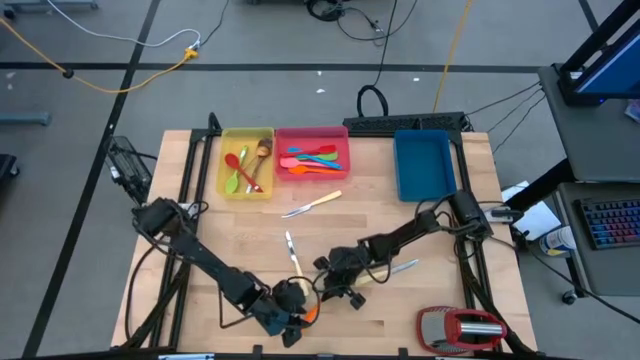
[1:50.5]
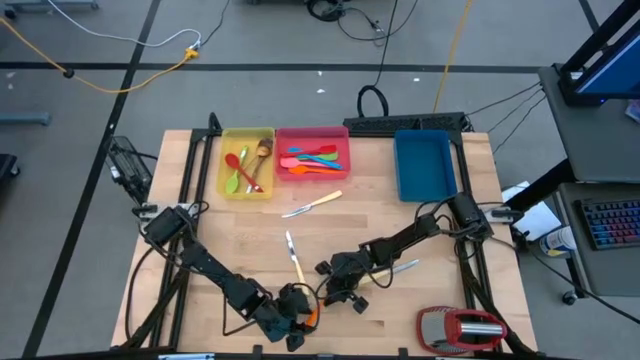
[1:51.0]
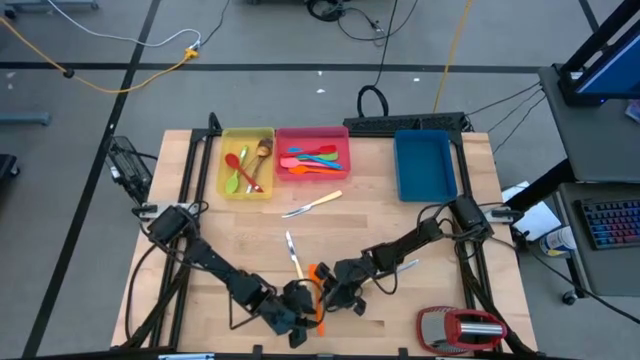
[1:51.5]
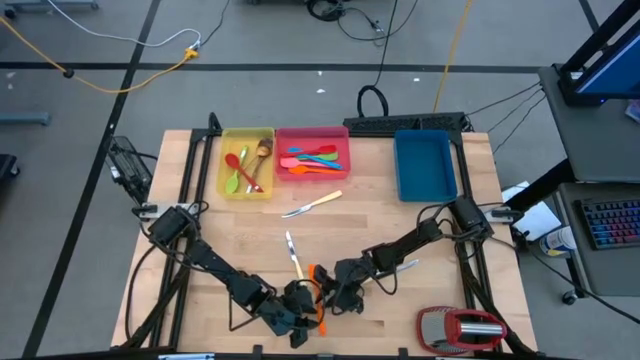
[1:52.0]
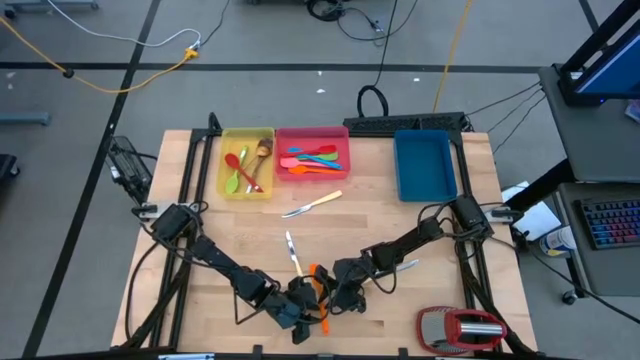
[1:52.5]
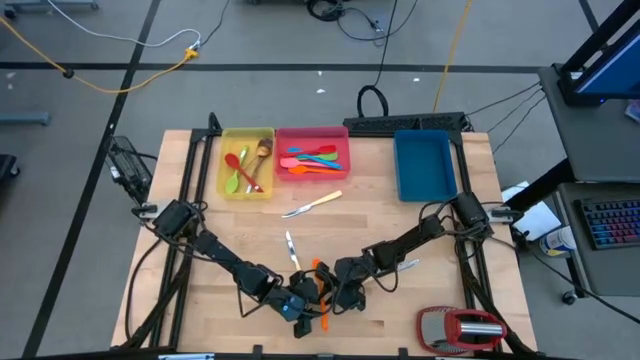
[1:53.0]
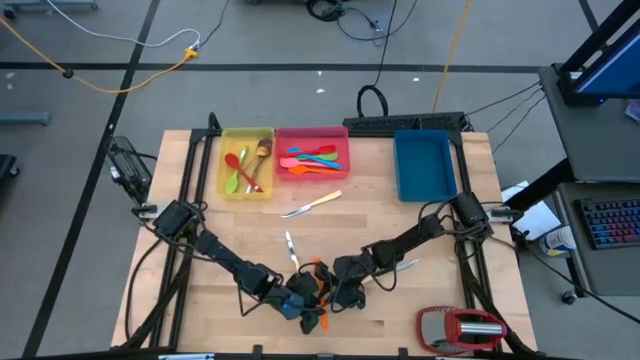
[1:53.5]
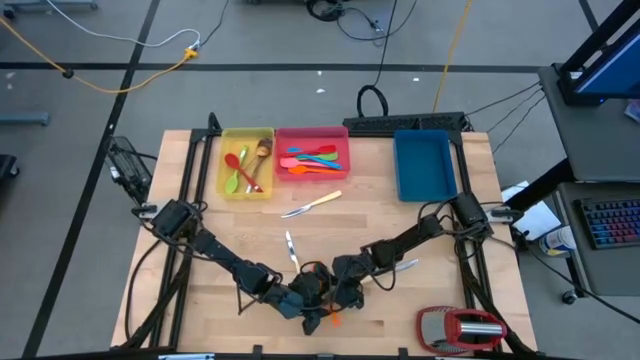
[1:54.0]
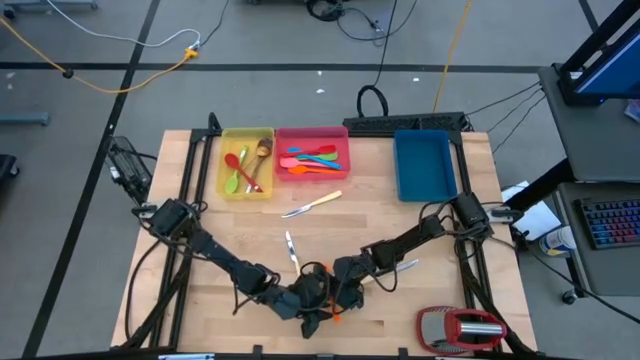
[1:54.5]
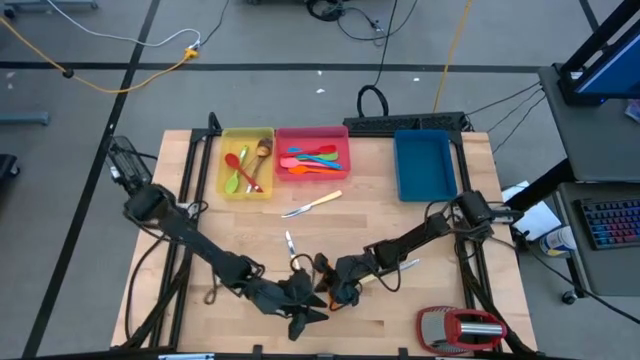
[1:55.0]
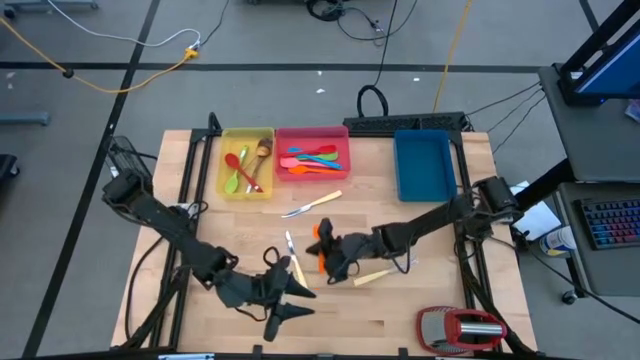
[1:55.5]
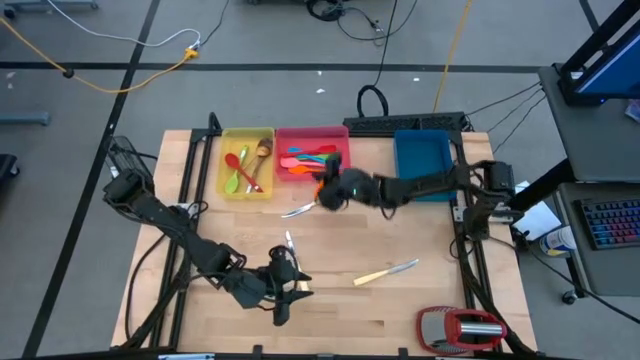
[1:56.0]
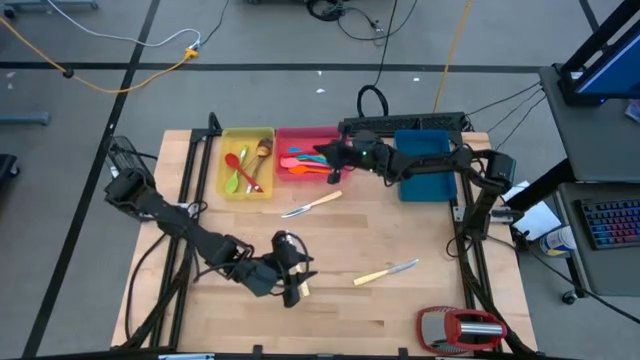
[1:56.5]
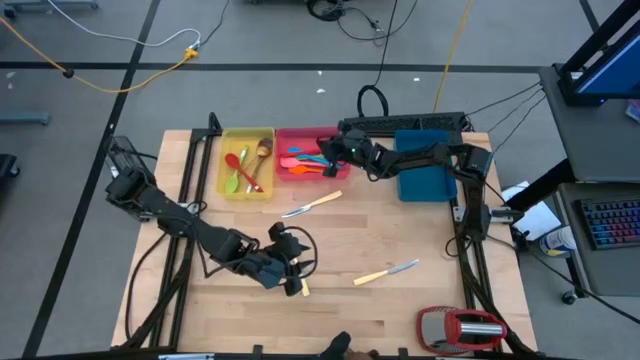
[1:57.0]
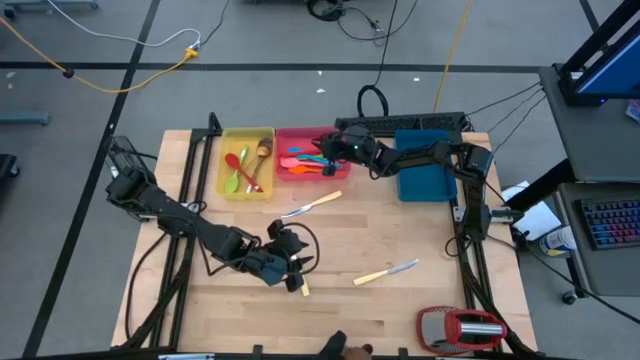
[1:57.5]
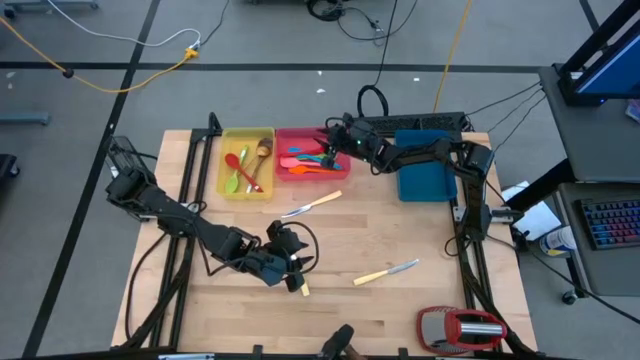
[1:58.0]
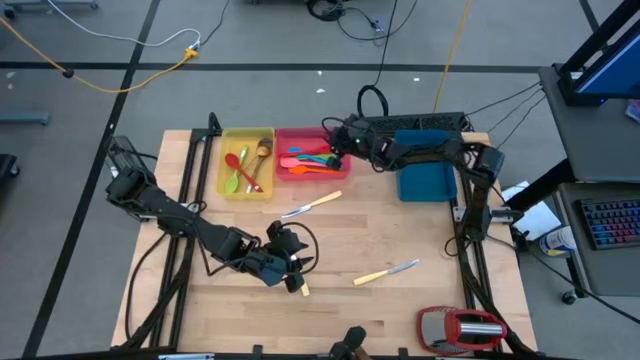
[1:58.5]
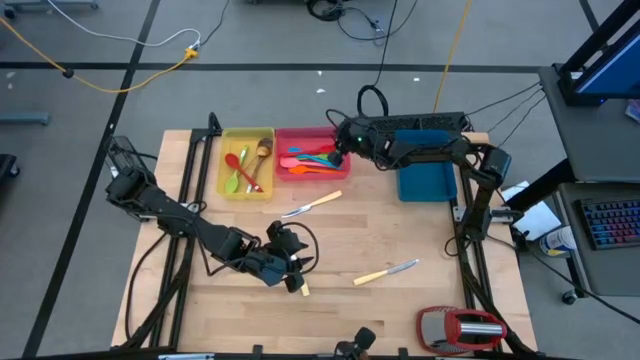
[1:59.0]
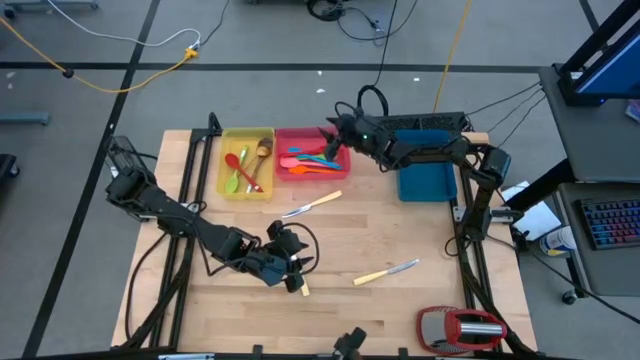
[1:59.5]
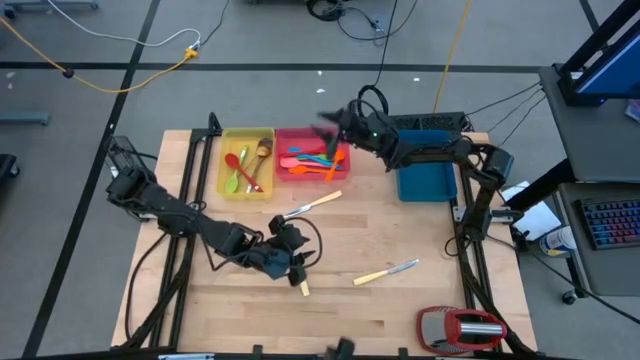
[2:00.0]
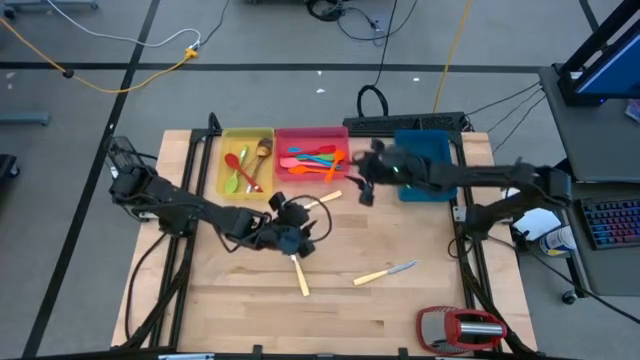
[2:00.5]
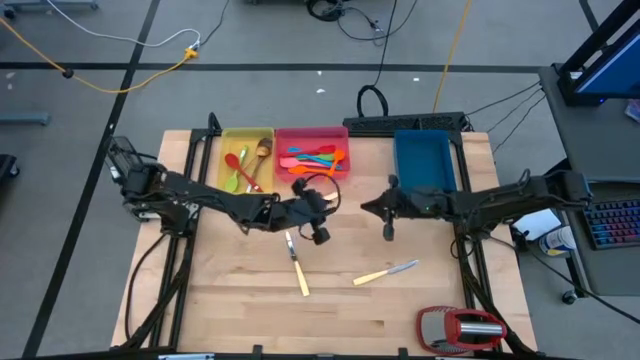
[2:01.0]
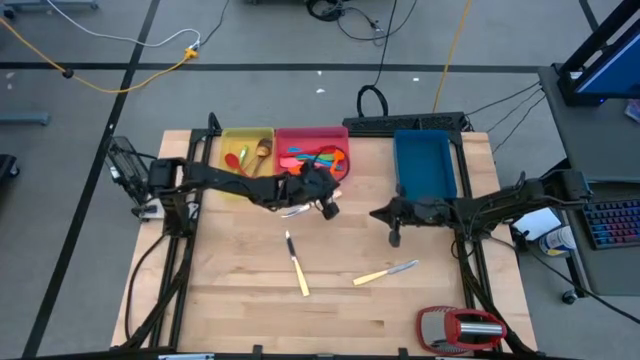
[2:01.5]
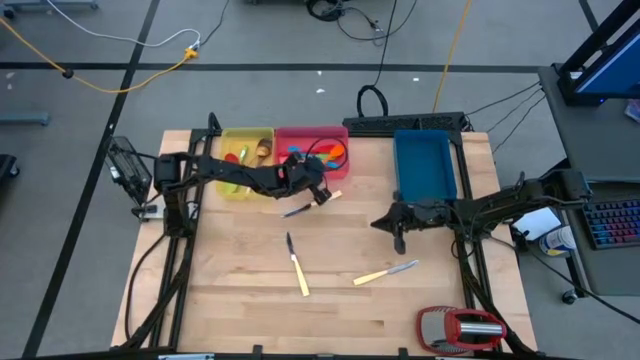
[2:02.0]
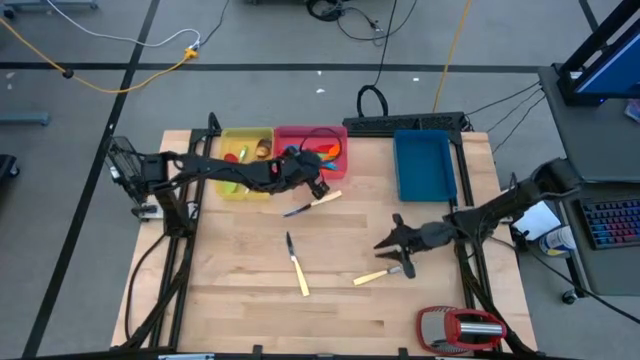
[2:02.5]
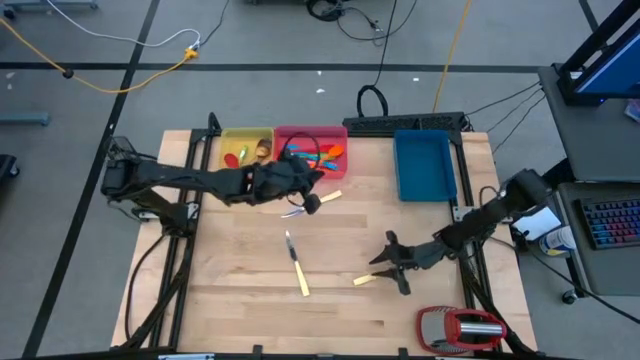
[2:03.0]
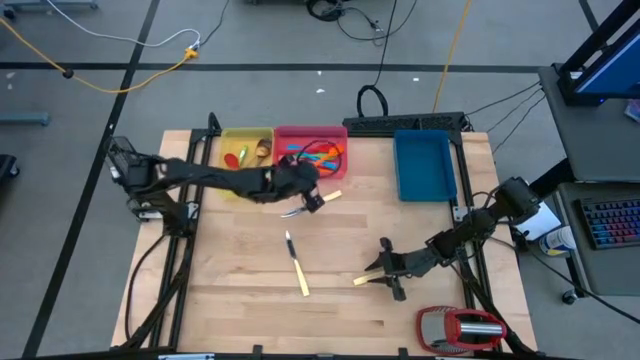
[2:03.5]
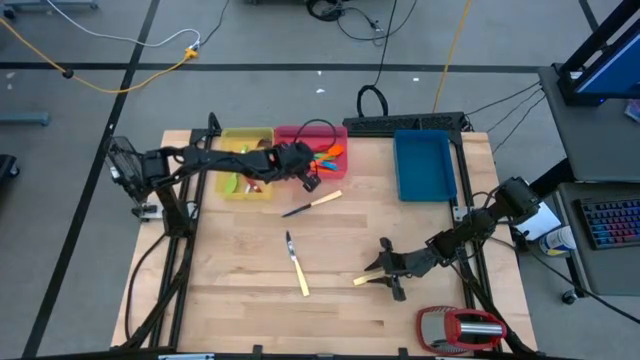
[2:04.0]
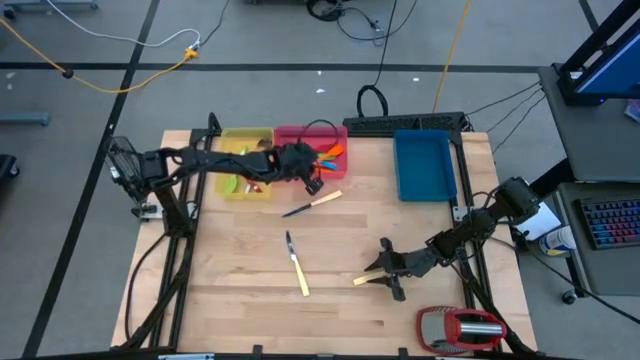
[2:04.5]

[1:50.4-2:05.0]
Task: Pick & Place Kitchen Items
Put the orange spatula into the red bin

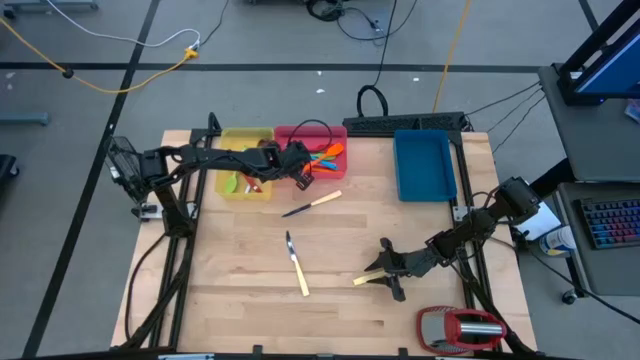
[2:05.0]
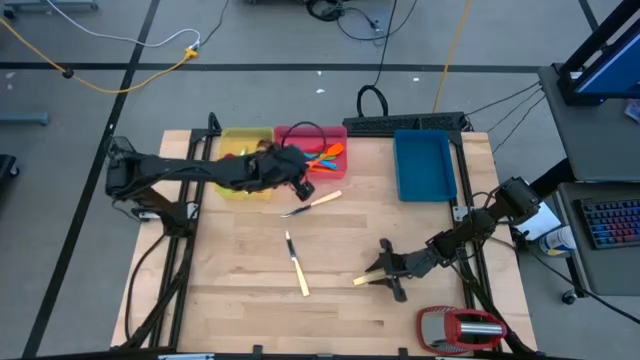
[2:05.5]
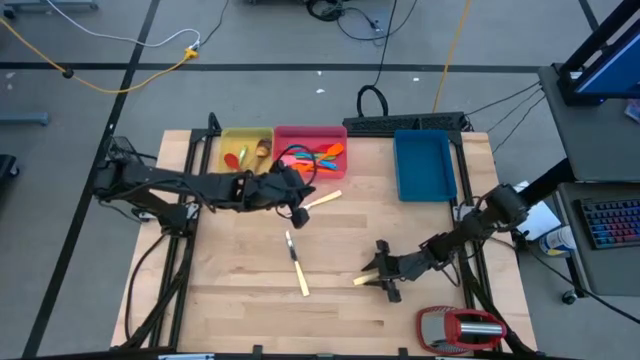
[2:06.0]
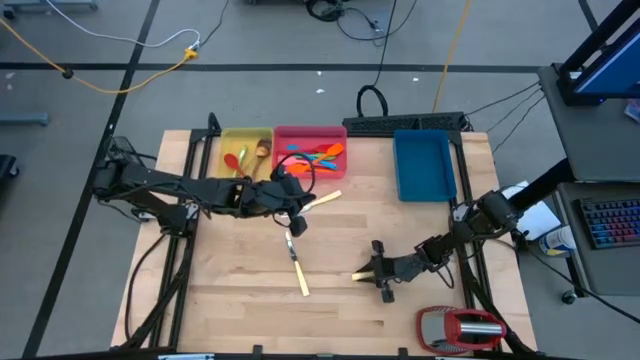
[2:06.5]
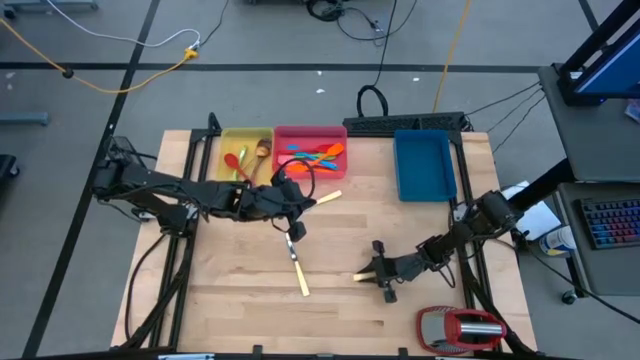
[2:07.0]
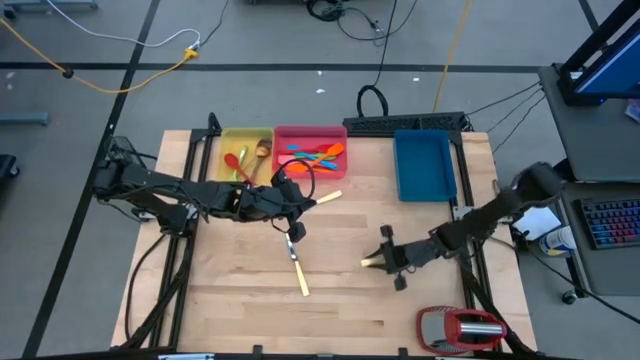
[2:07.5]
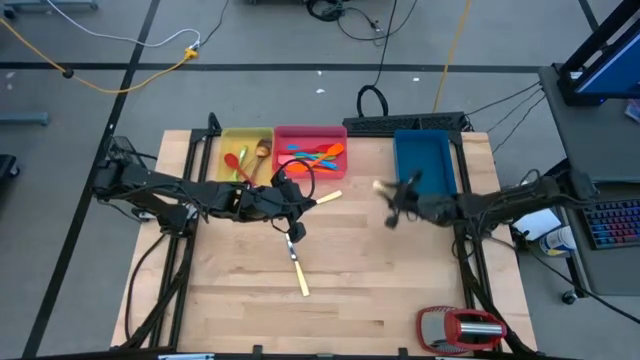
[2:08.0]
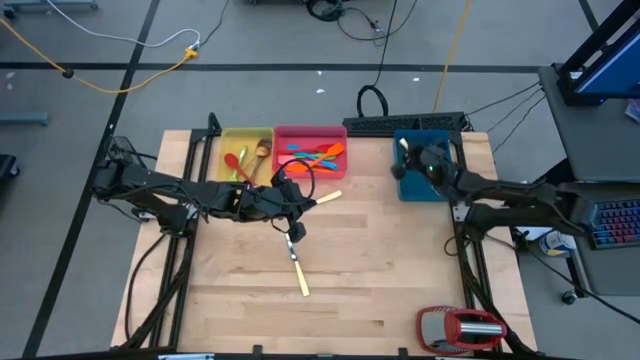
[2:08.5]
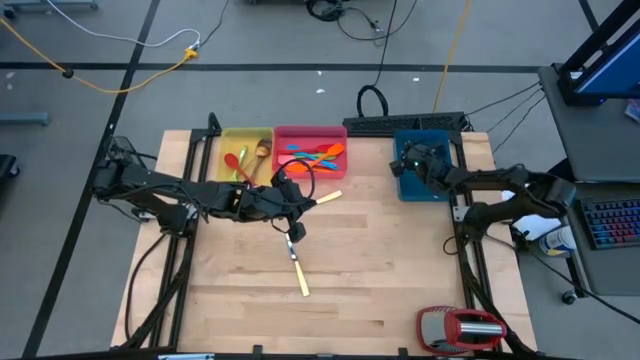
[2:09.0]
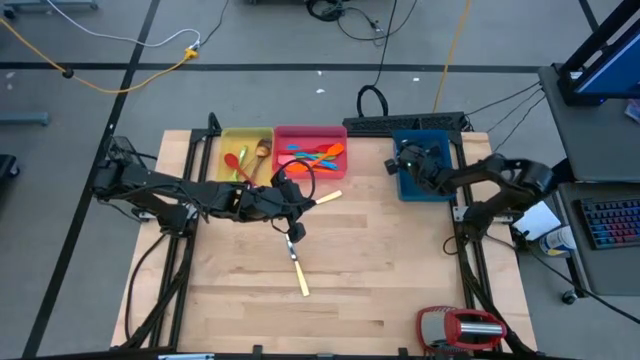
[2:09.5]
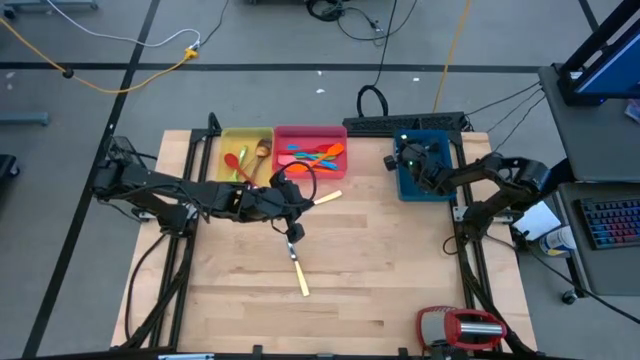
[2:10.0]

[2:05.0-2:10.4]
Put the bottom right yellow table knife into the blue bin

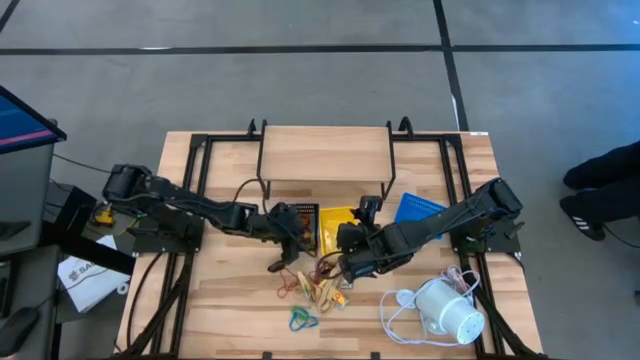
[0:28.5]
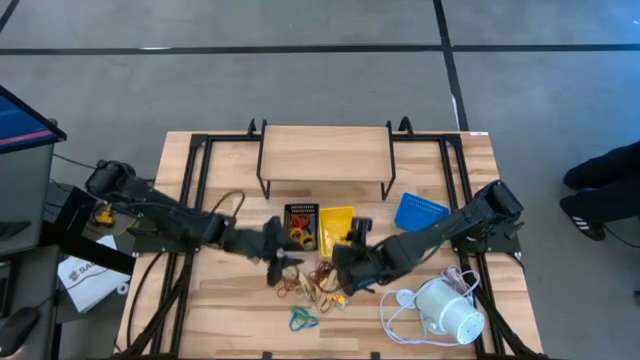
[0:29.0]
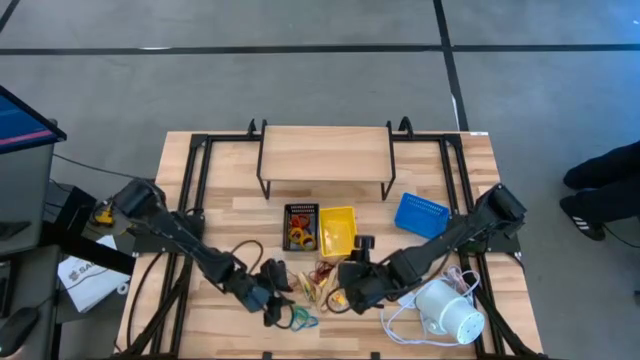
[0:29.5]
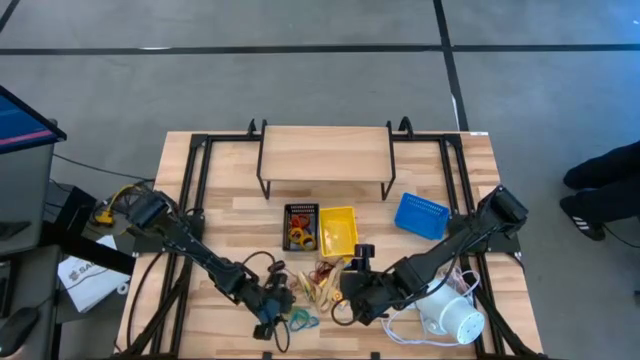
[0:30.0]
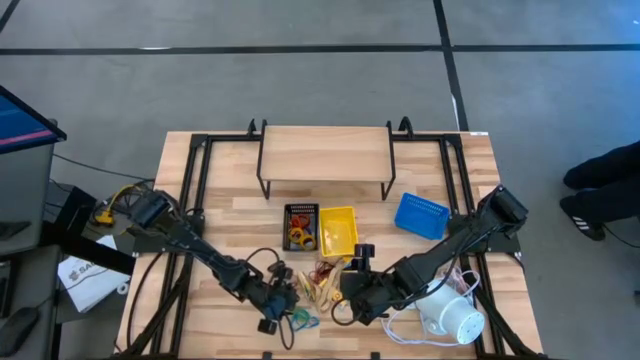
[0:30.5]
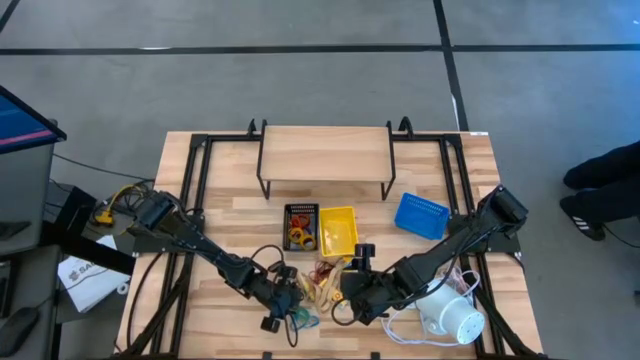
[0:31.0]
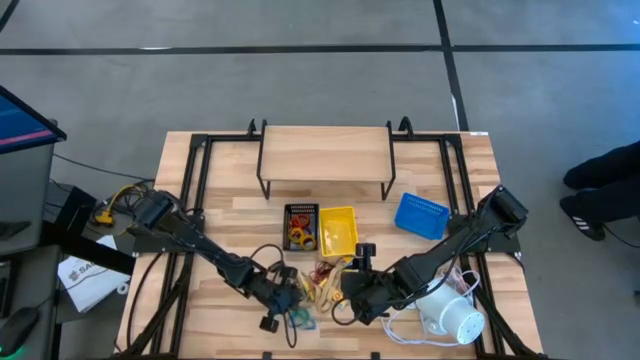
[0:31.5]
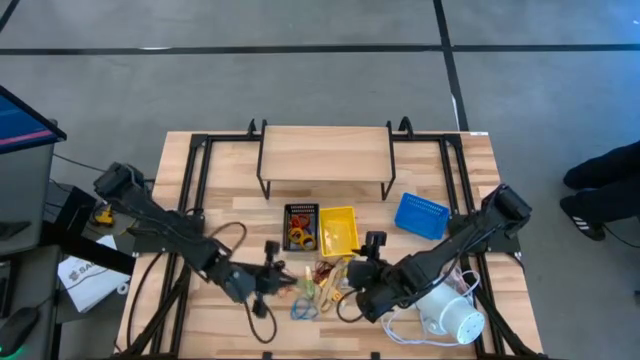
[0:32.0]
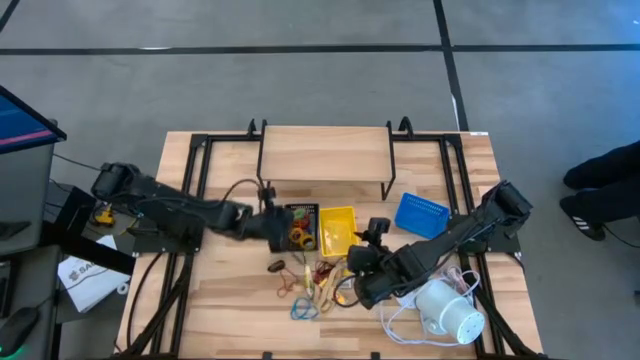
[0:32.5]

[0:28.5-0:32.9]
Task: Pick & Place Office Desk Supplies
Put the green spring keychain into the black bin
